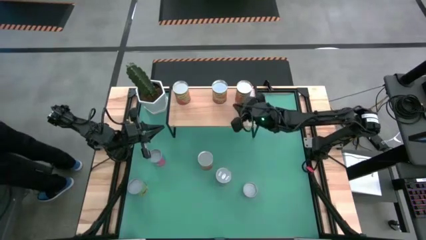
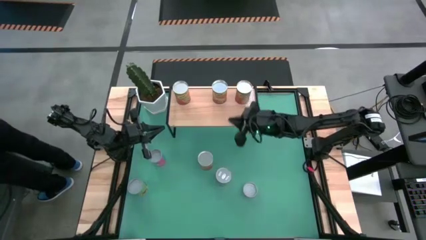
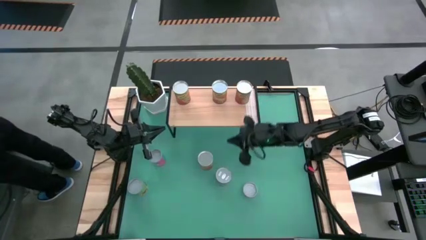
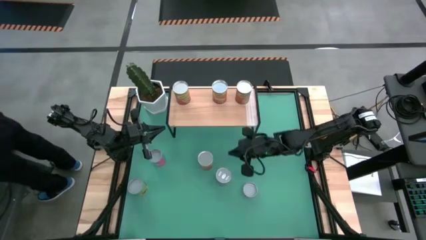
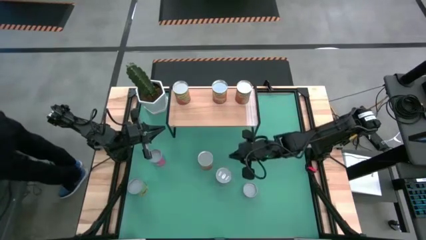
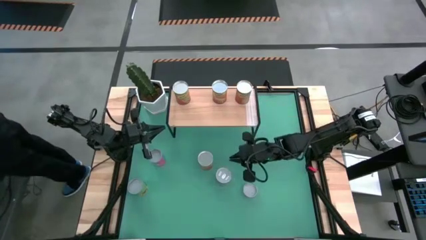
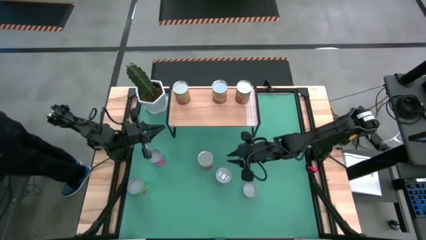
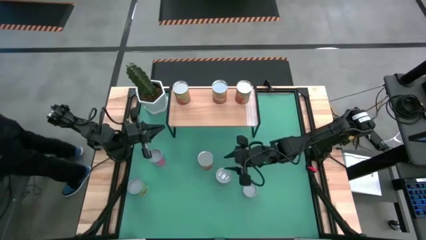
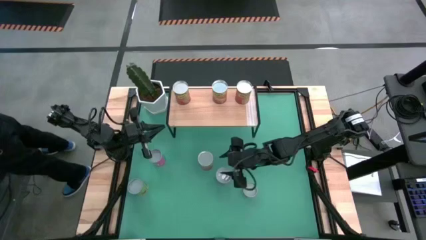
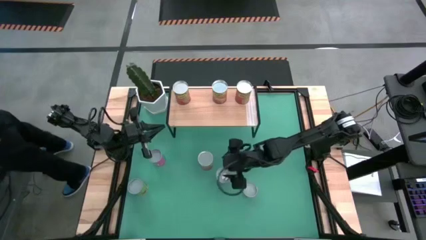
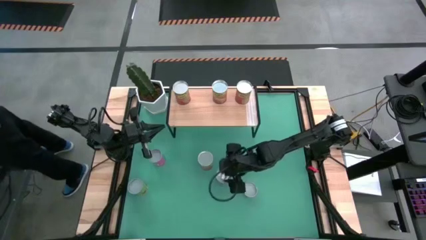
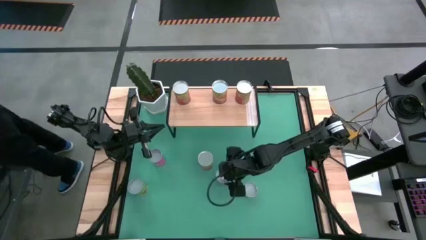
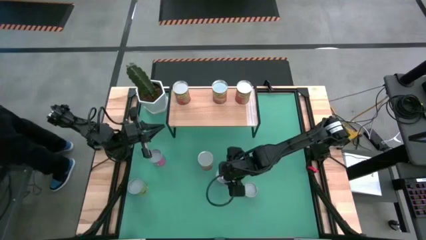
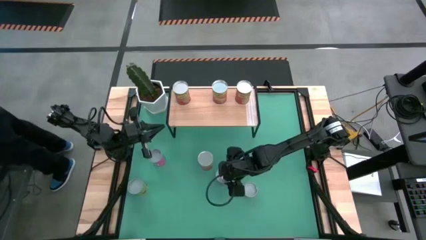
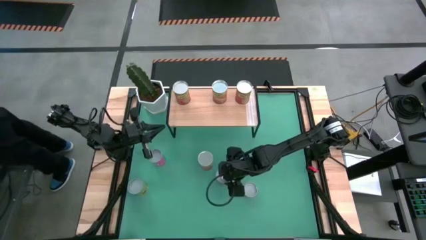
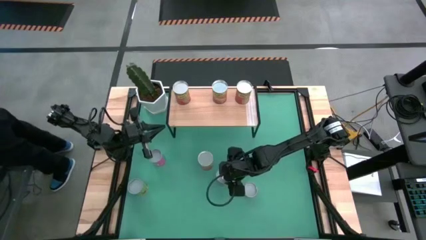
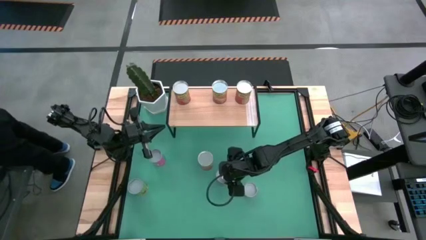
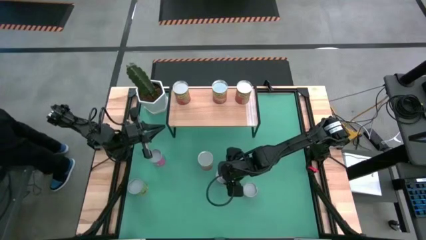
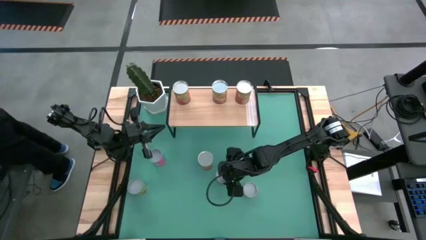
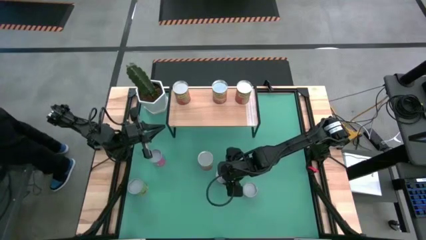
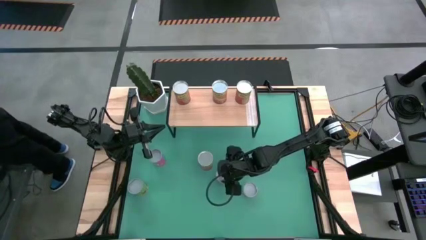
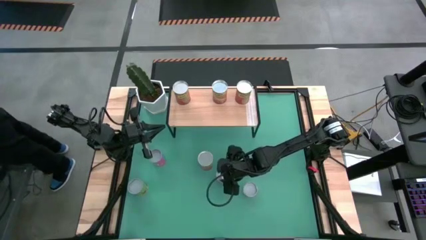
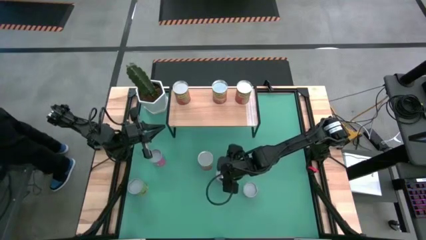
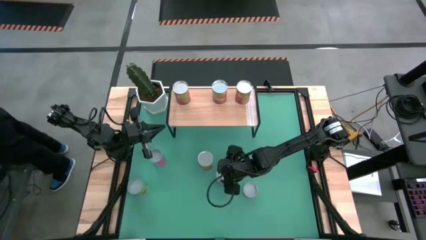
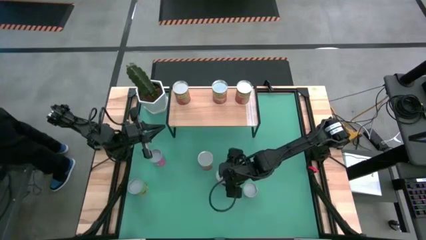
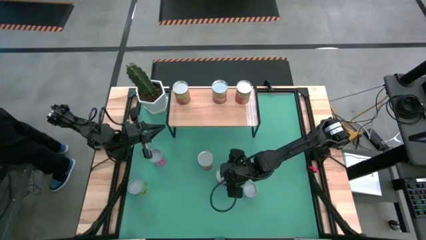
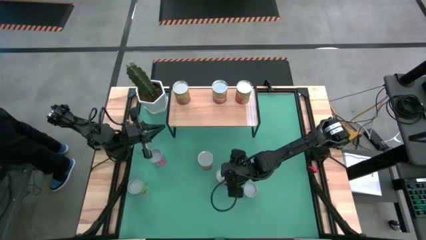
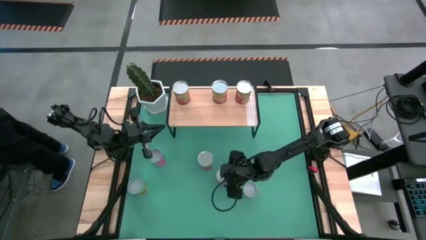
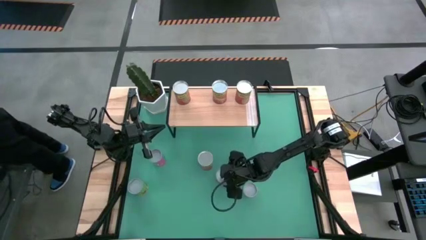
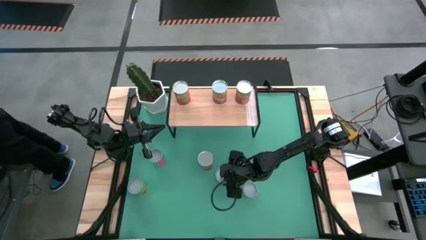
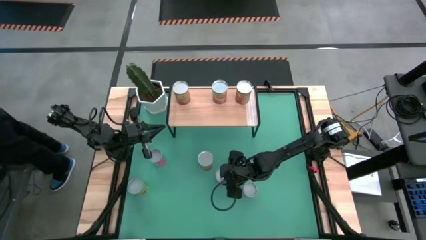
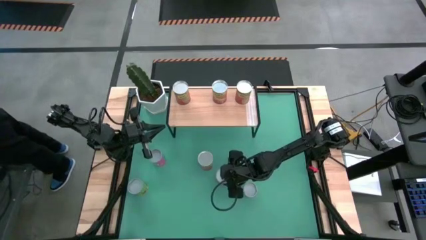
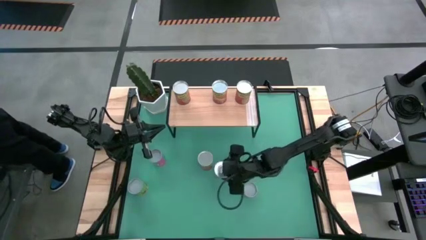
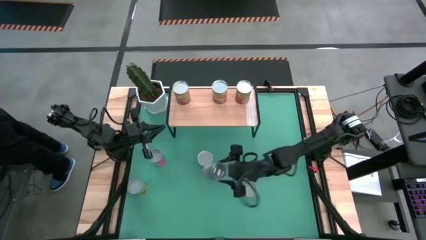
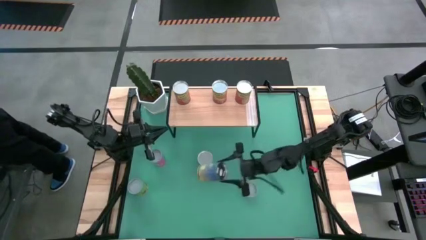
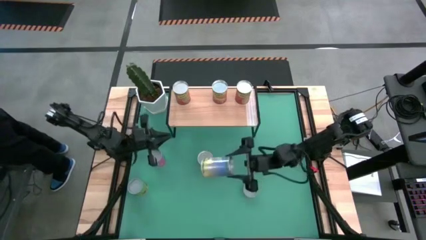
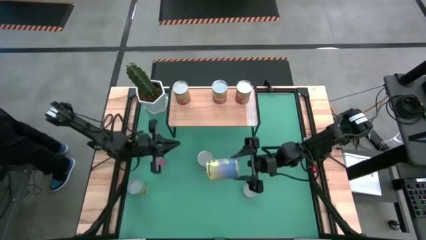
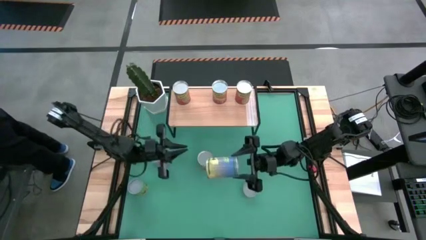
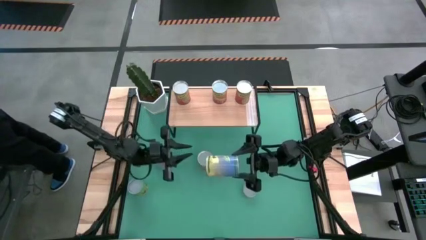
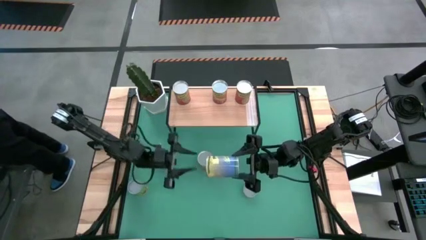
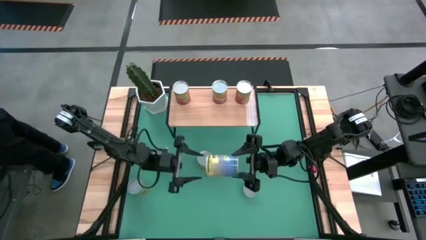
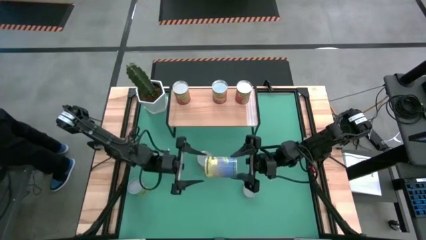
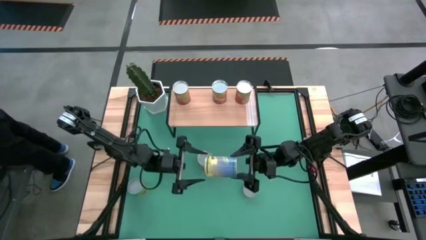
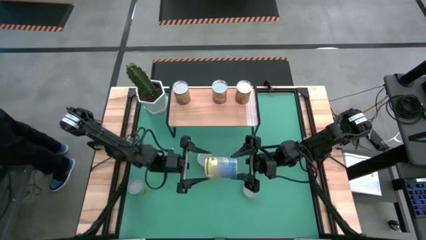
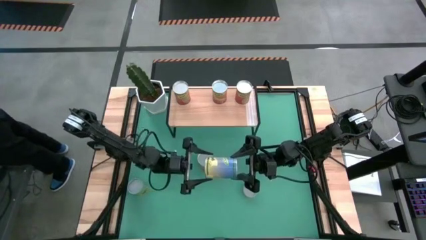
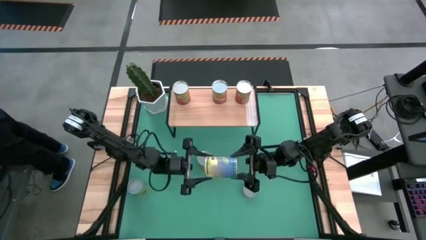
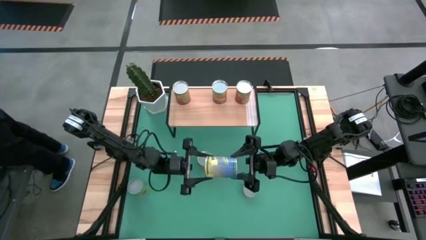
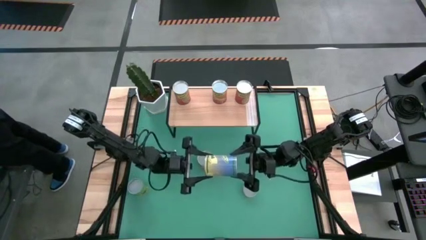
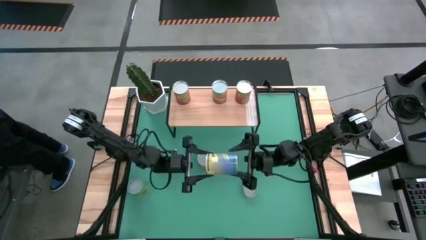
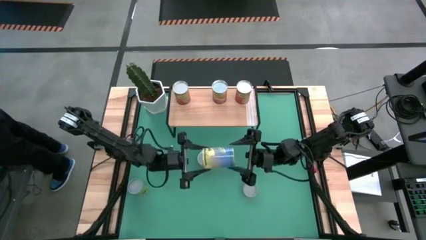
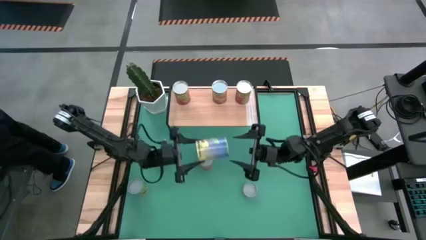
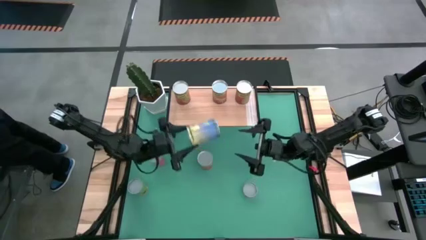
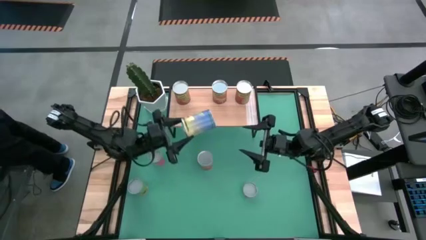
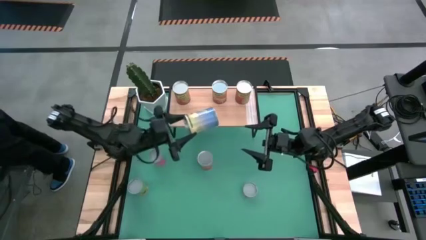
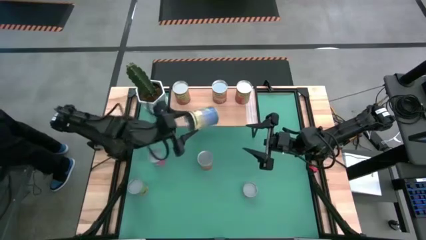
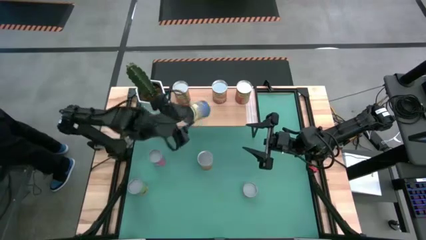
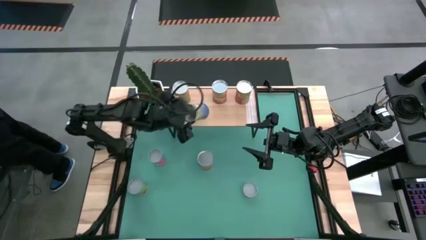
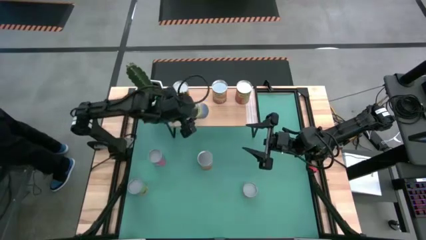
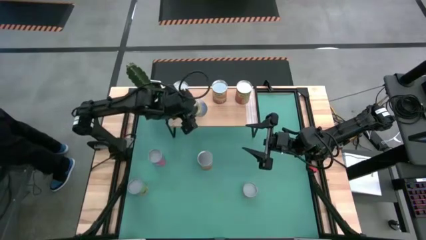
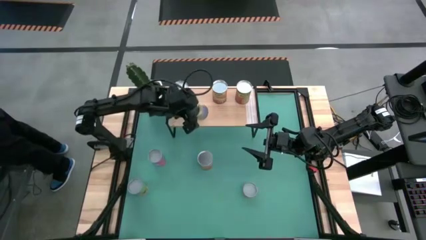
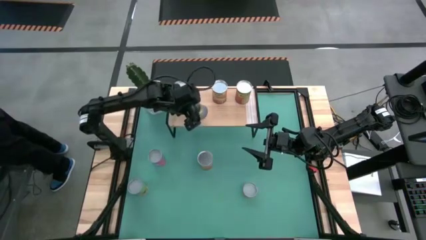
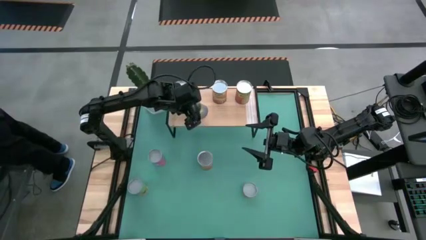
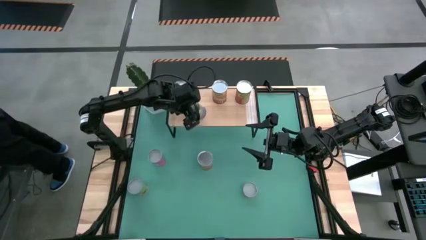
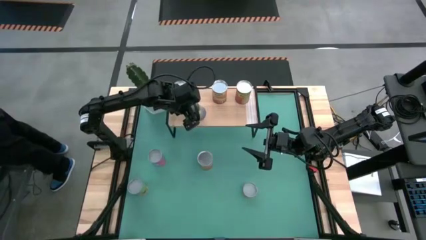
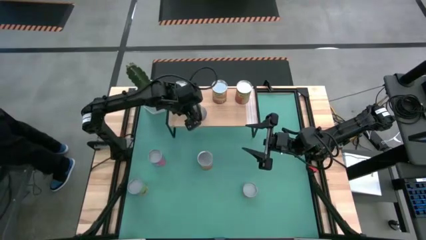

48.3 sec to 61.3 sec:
Task: Pick and place cans onto a shelf
Put the canned peas on the shelf

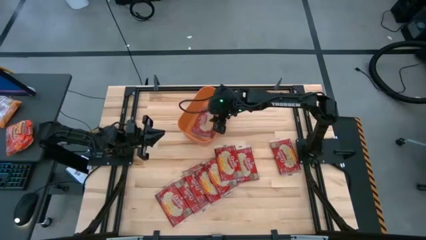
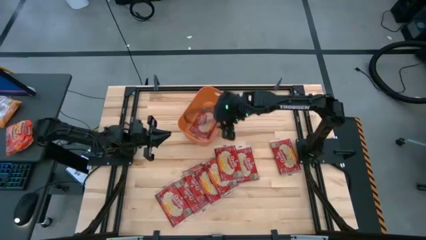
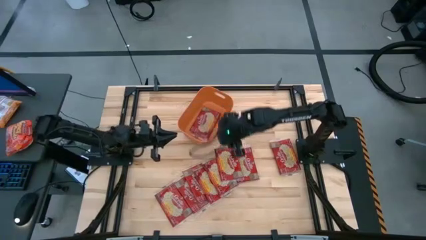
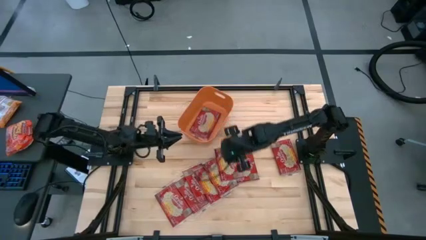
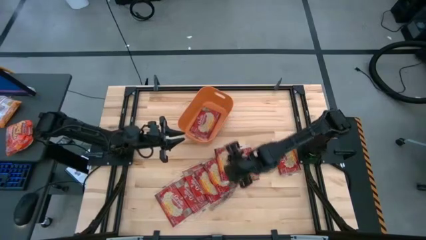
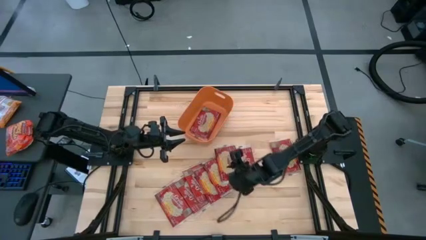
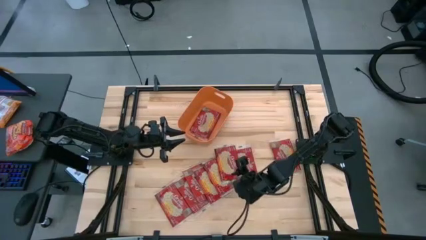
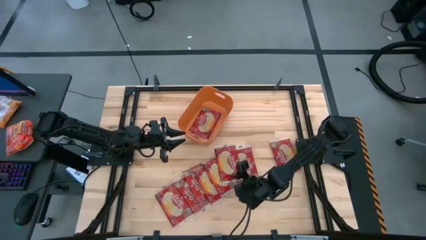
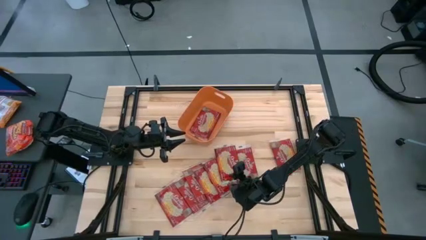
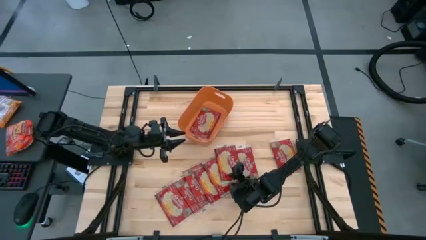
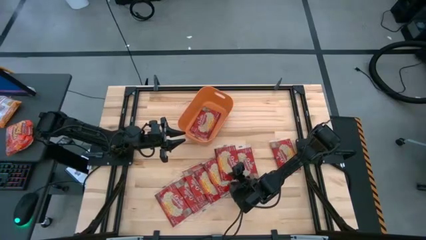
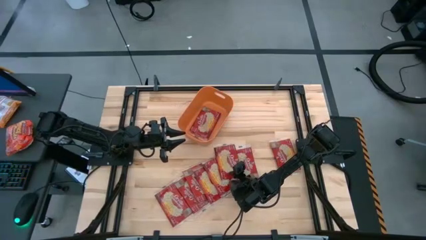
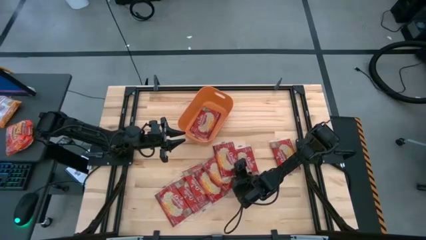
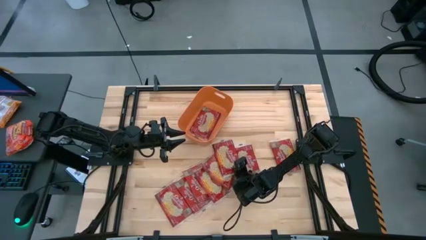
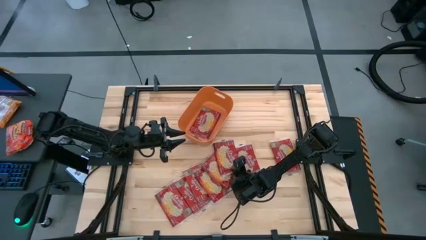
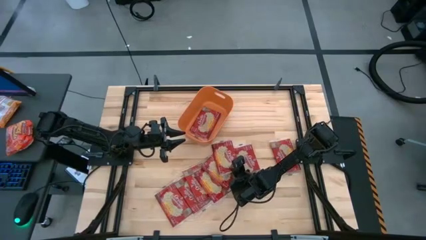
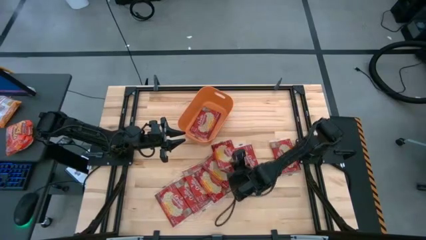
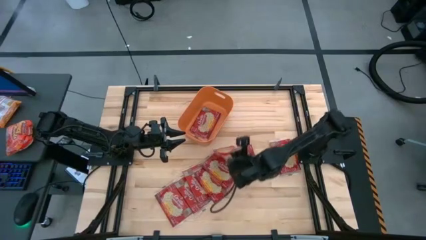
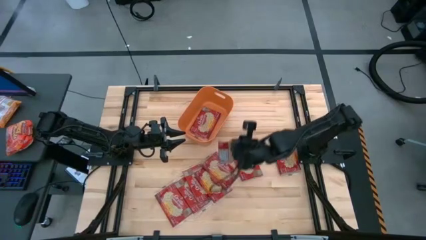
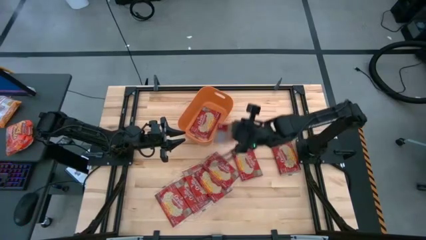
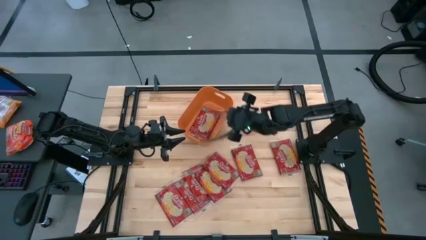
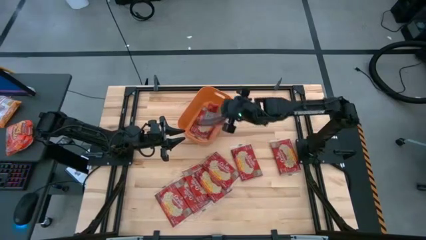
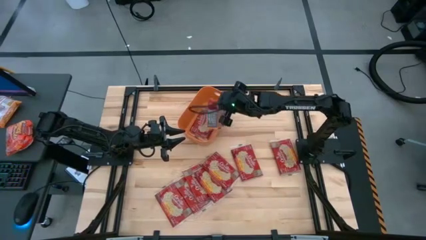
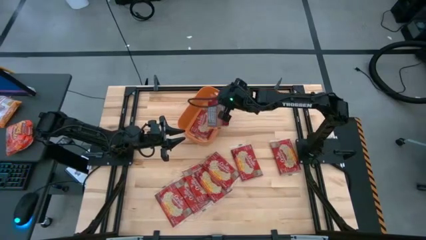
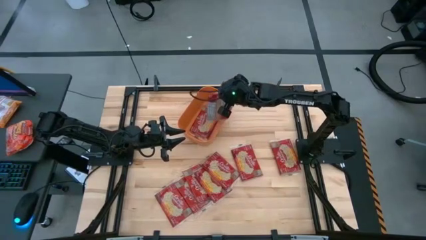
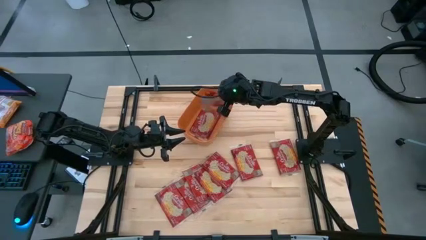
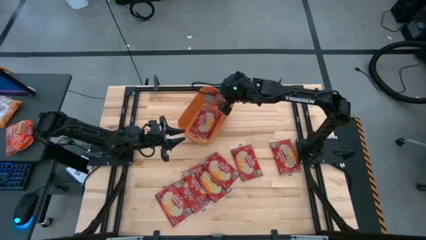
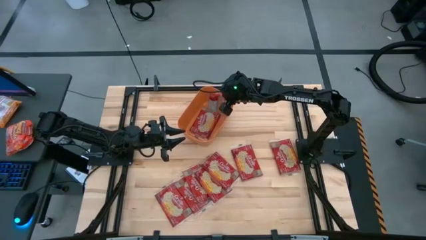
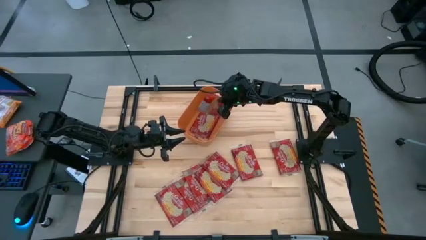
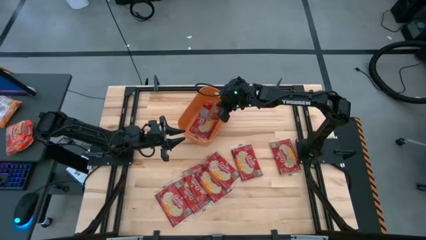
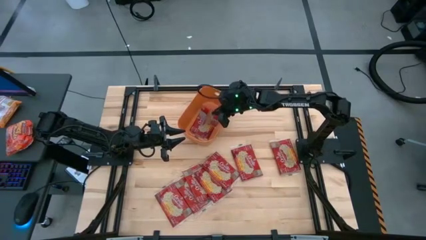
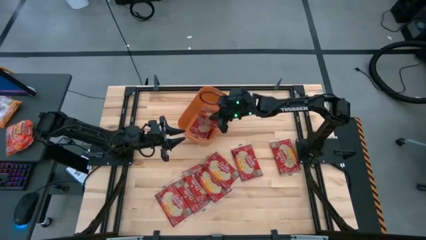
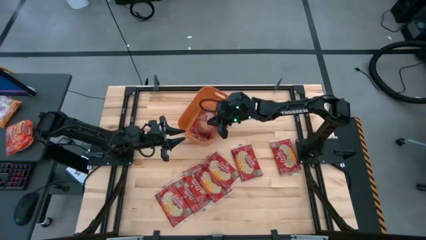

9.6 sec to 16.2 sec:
Task: Sort popcorn bags into baskets
Put the red popcorn bag into the orange bin
